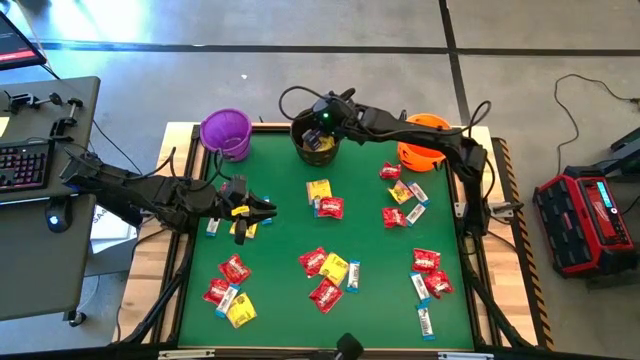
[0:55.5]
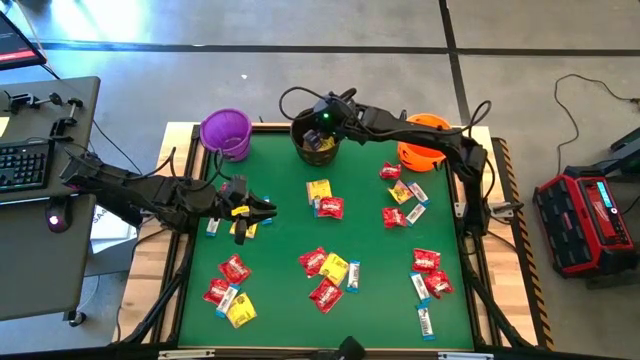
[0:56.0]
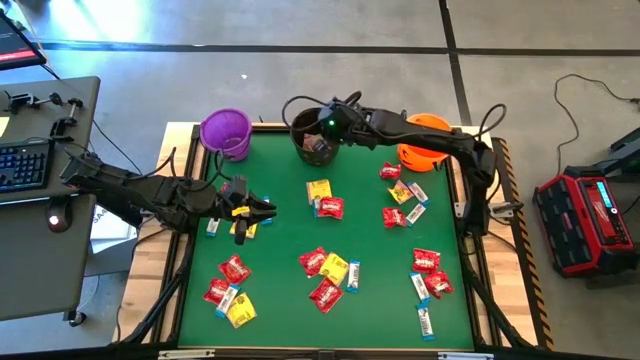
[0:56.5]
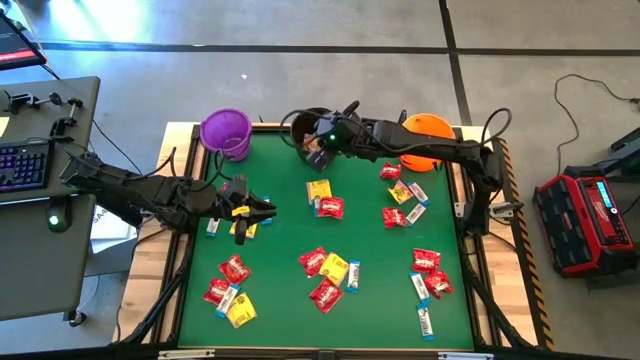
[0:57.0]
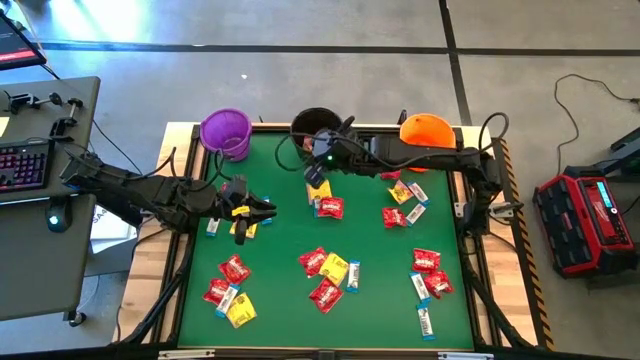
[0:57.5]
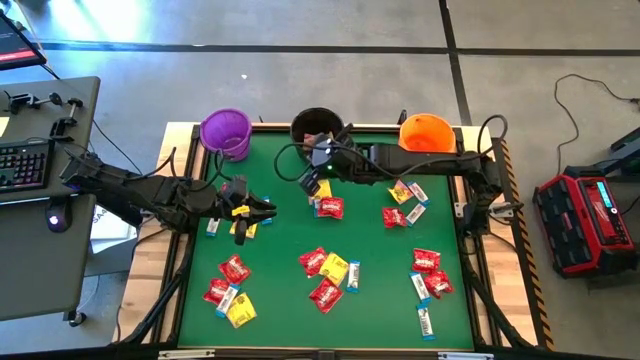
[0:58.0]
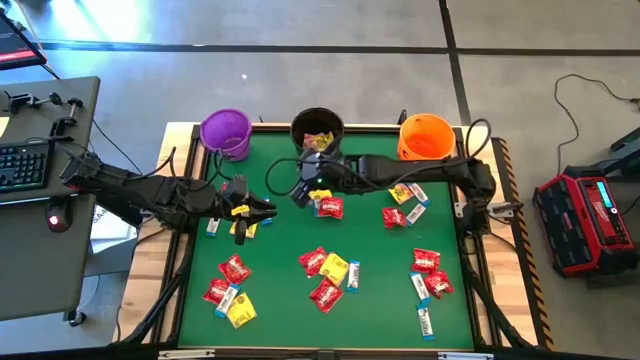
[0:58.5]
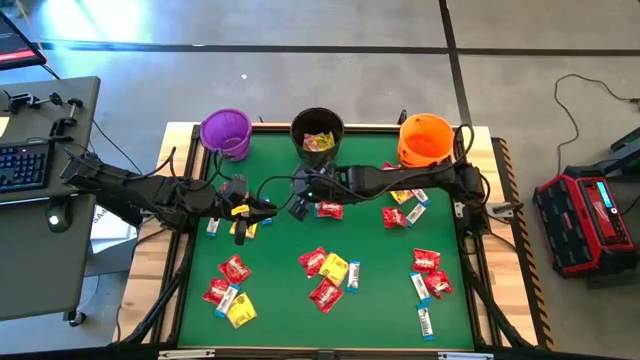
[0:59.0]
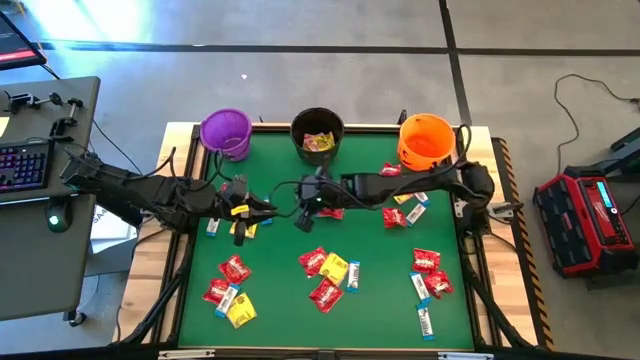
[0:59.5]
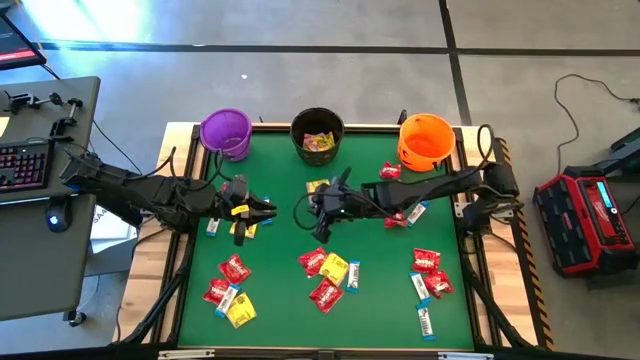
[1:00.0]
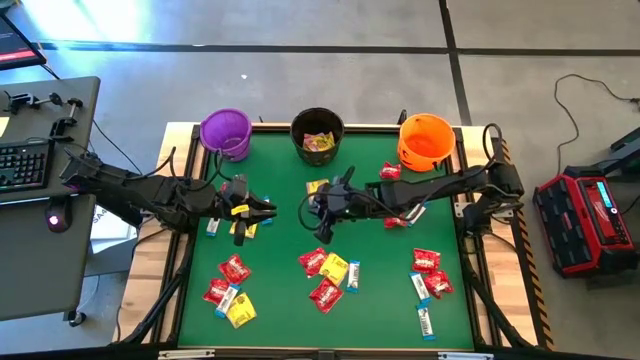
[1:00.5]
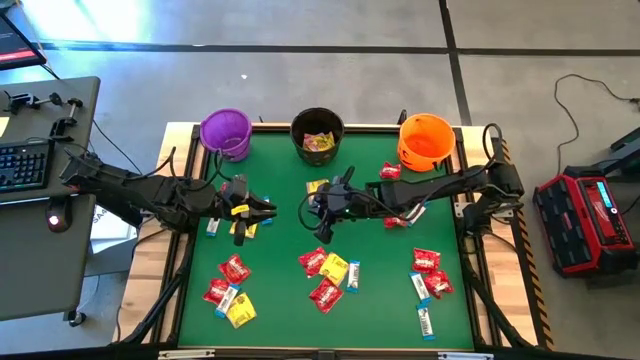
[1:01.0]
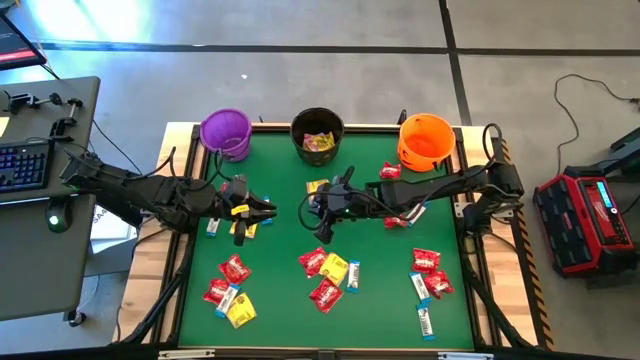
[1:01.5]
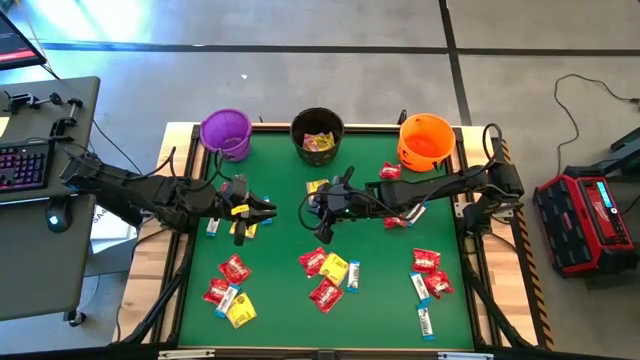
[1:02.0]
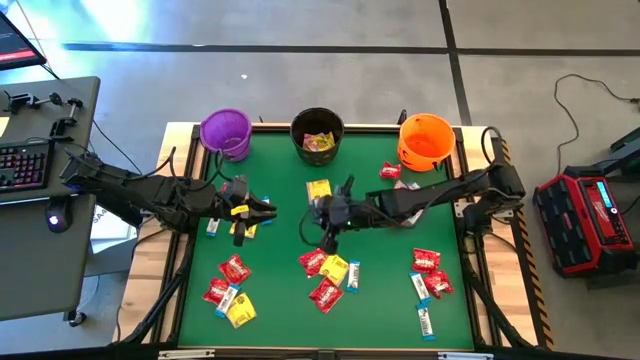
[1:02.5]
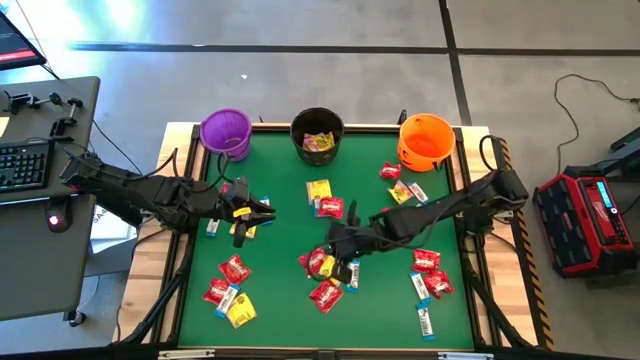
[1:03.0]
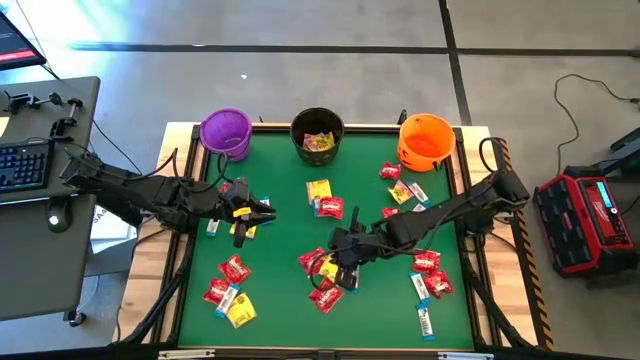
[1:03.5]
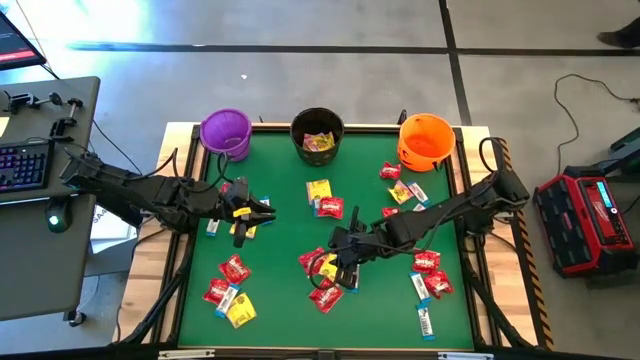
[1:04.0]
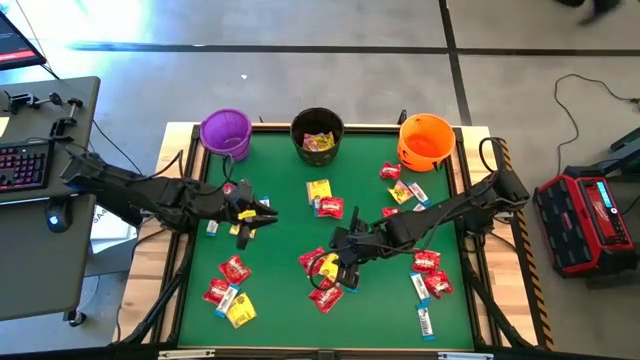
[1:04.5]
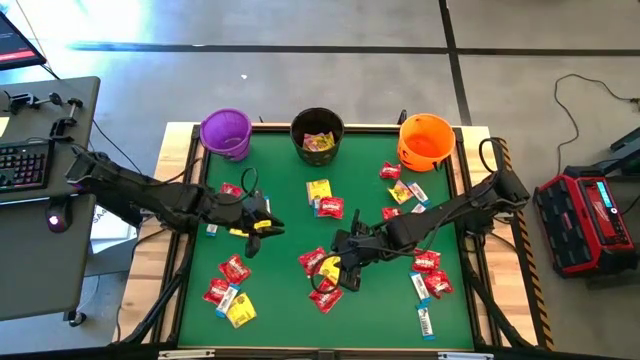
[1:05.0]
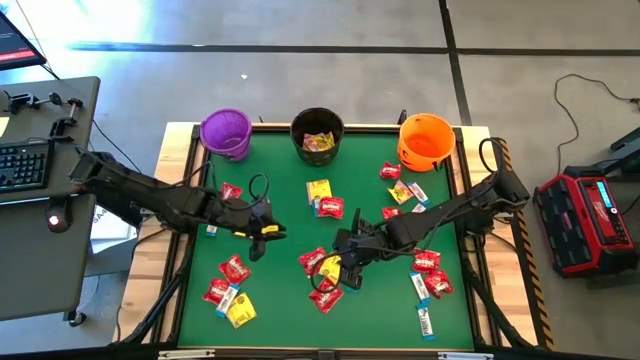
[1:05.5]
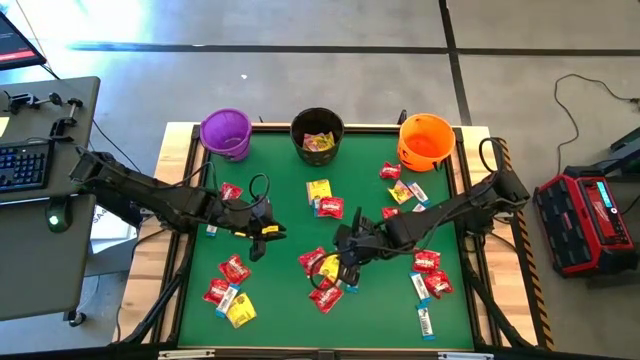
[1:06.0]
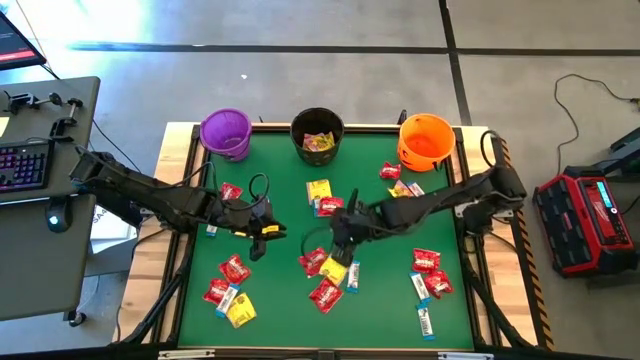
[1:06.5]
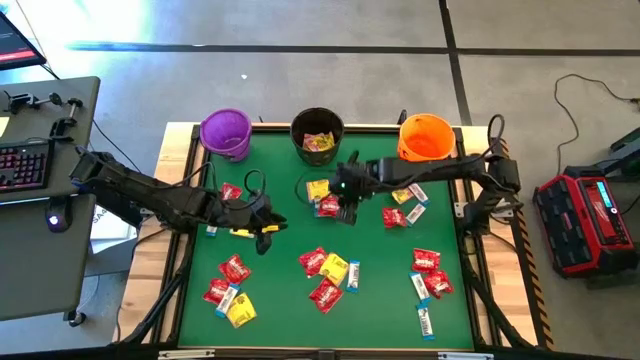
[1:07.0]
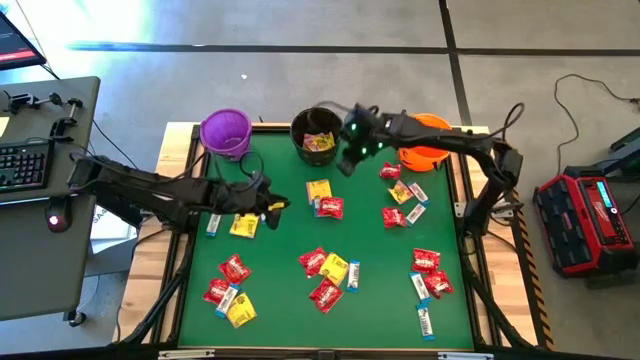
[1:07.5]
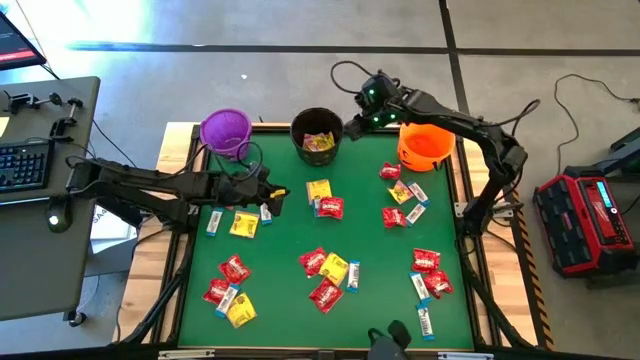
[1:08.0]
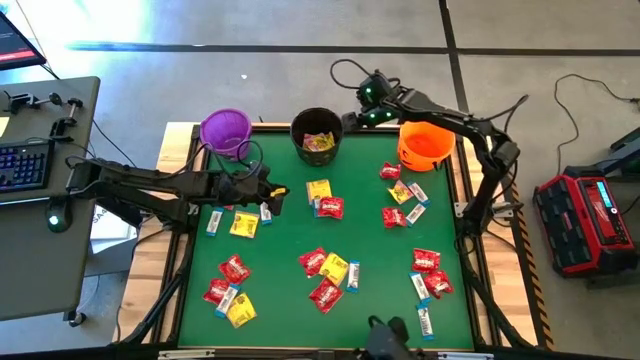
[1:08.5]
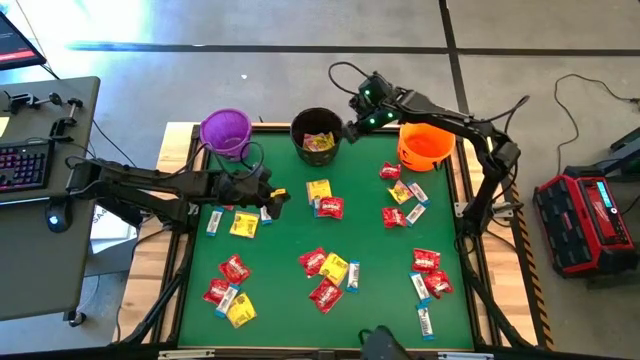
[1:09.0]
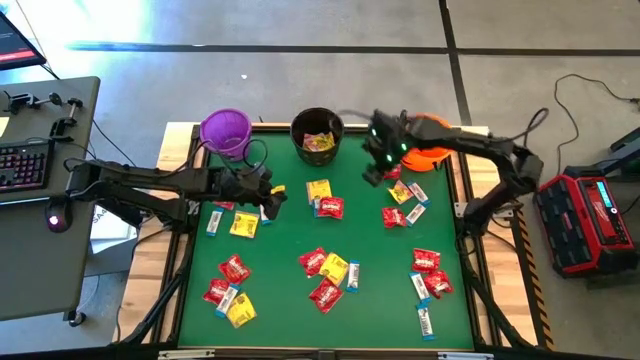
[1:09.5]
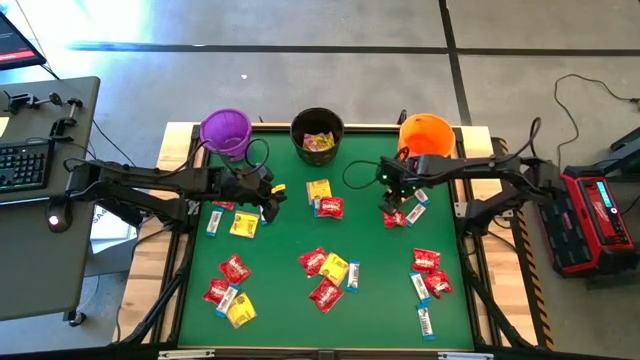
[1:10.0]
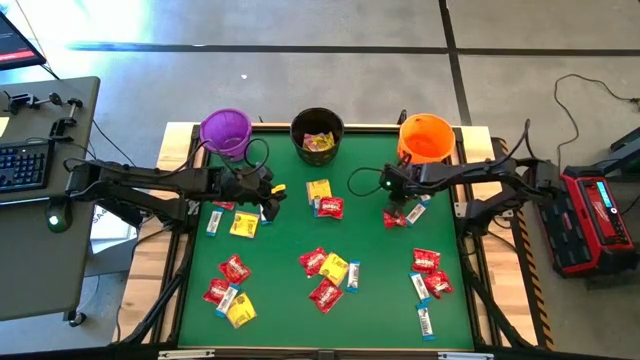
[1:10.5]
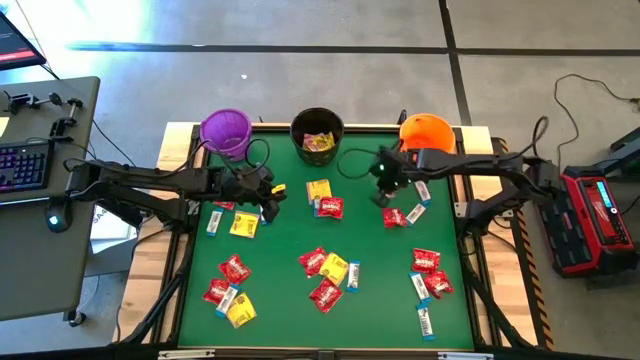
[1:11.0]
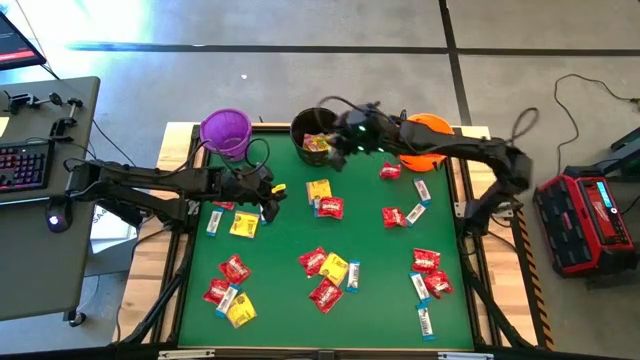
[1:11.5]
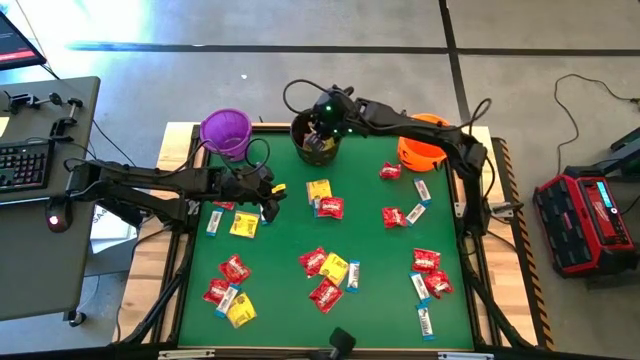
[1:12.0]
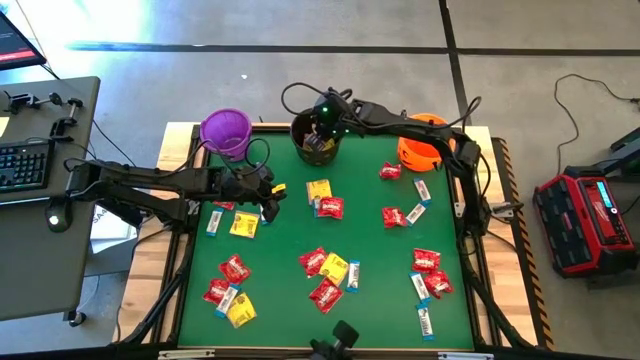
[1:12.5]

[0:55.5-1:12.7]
Task: Sort candy by brand, put in halloween buckets
Put the yellow candy pack into the black bucket

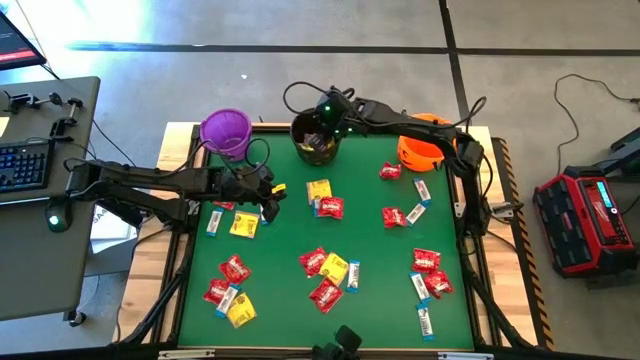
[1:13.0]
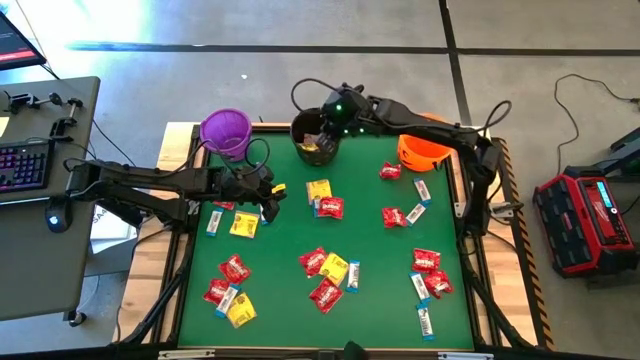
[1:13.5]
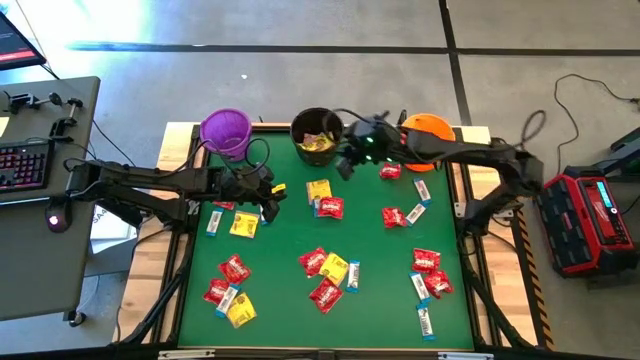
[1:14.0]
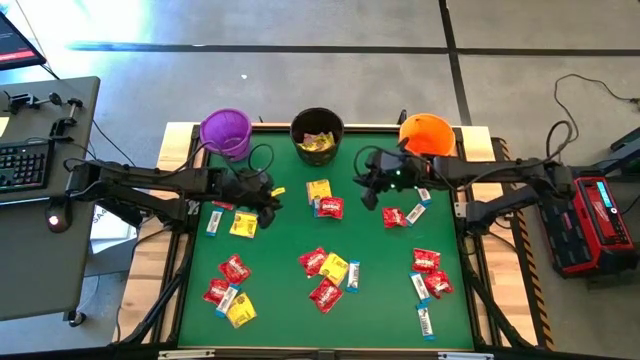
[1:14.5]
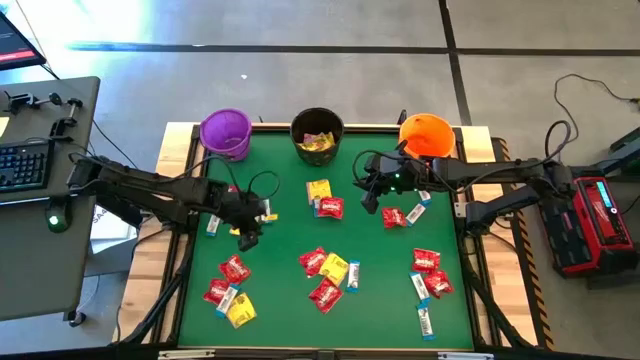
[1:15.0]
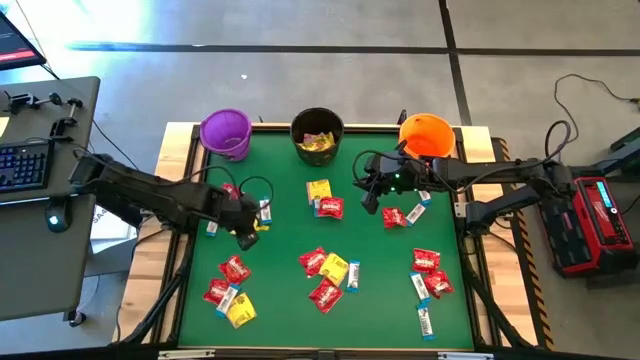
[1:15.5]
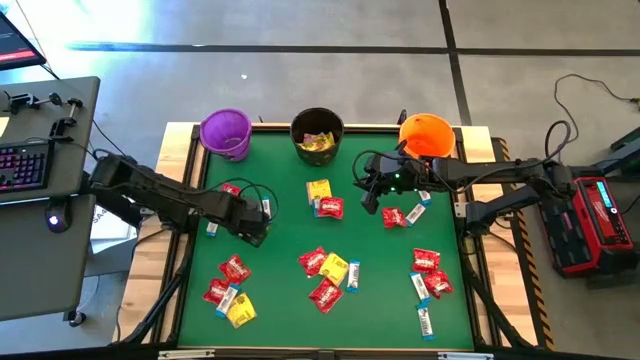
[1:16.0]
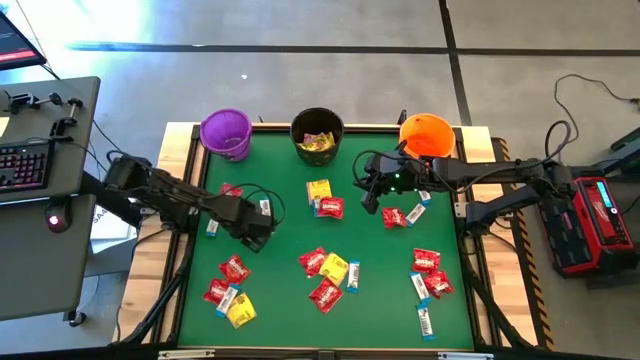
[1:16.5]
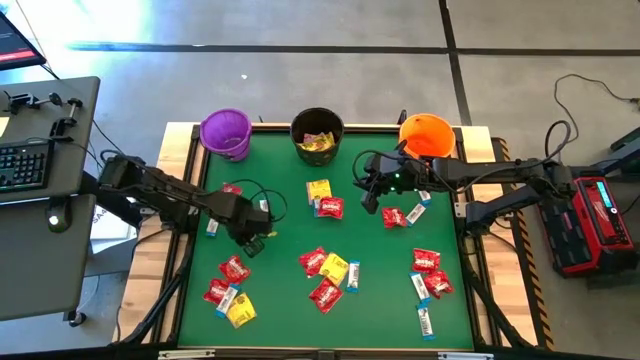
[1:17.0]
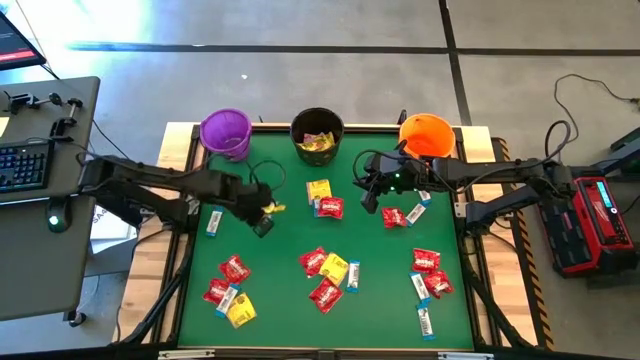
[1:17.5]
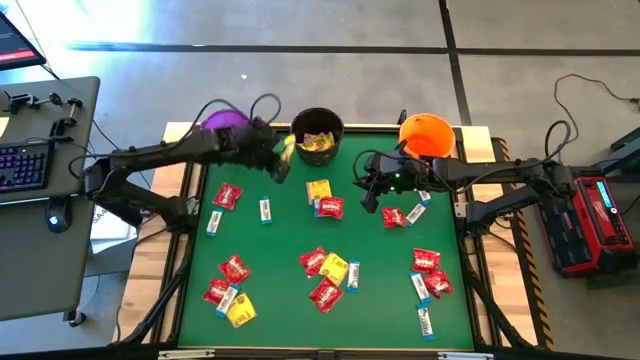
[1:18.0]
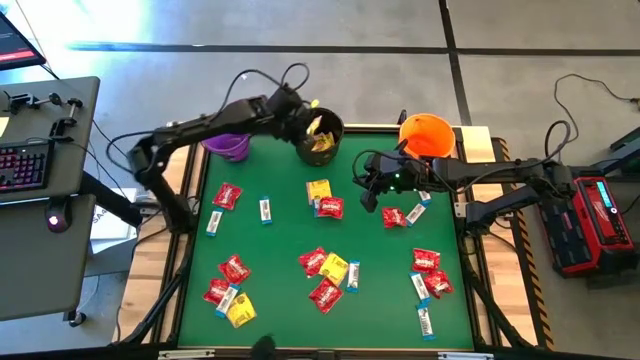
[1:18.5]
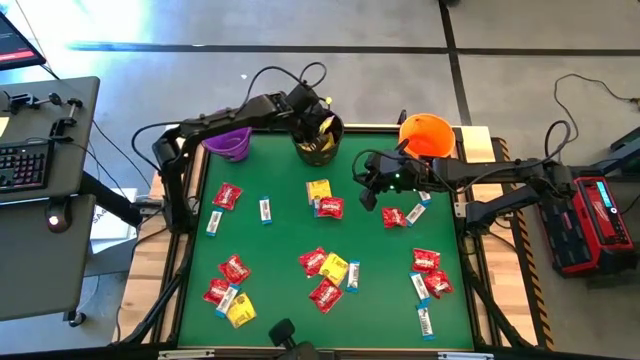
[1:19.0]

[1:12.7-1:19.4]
Put the yellow candy pack into the black bucket
